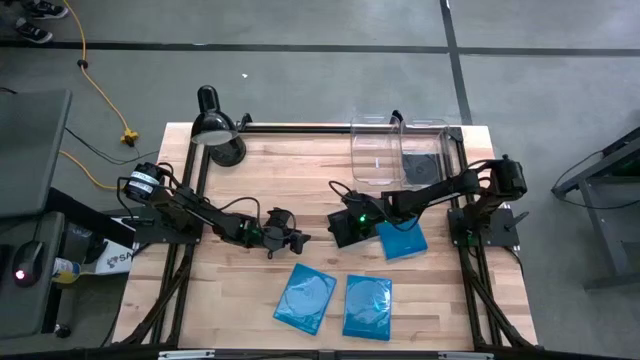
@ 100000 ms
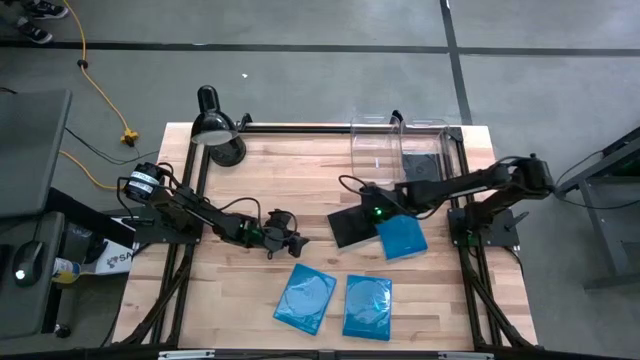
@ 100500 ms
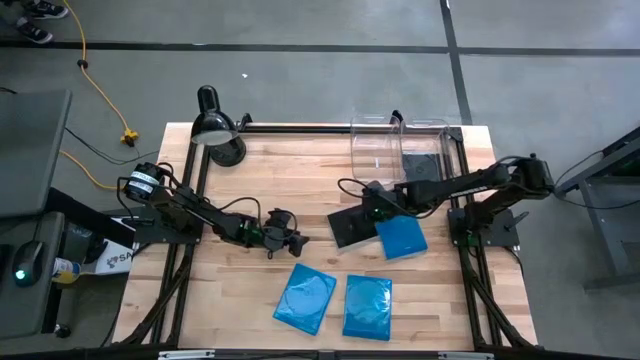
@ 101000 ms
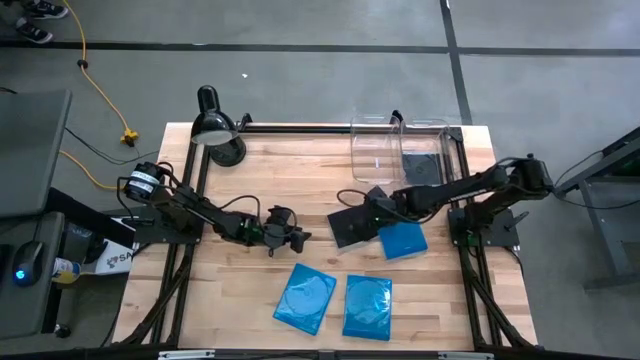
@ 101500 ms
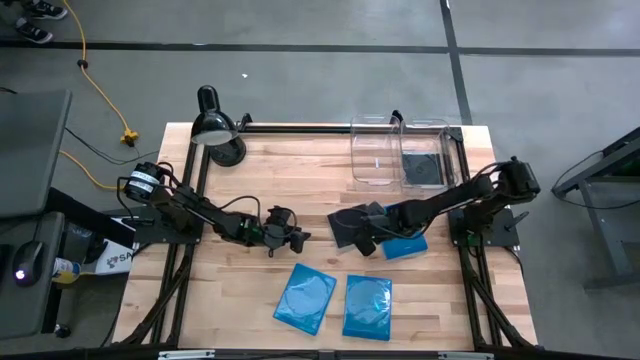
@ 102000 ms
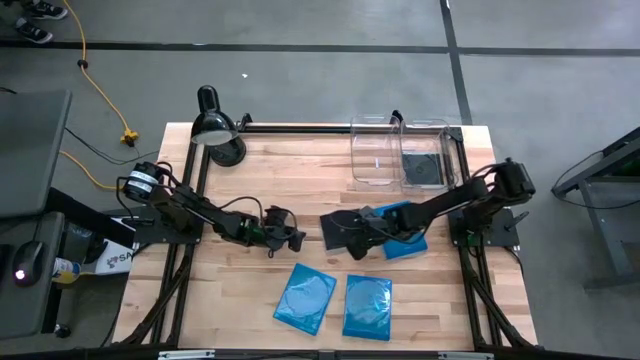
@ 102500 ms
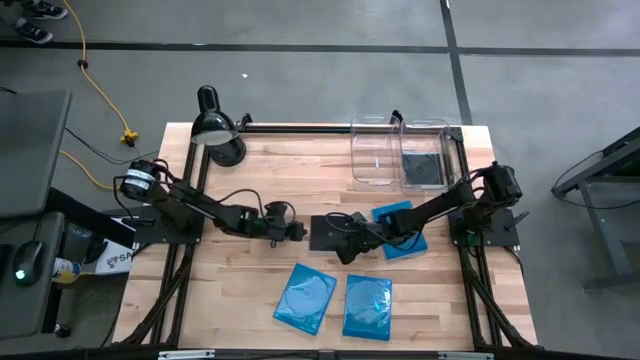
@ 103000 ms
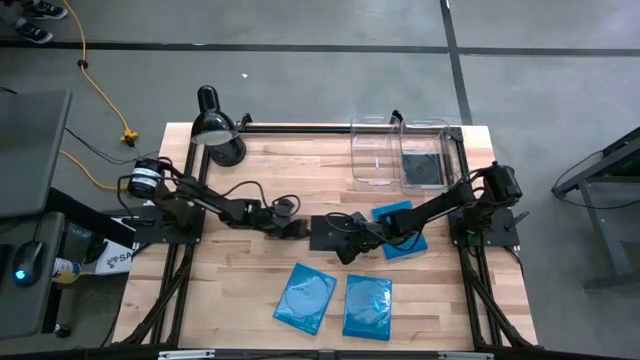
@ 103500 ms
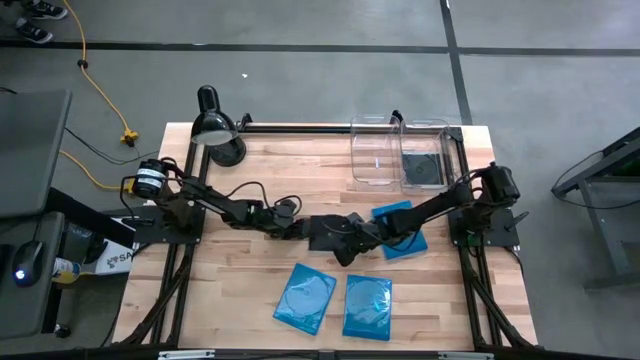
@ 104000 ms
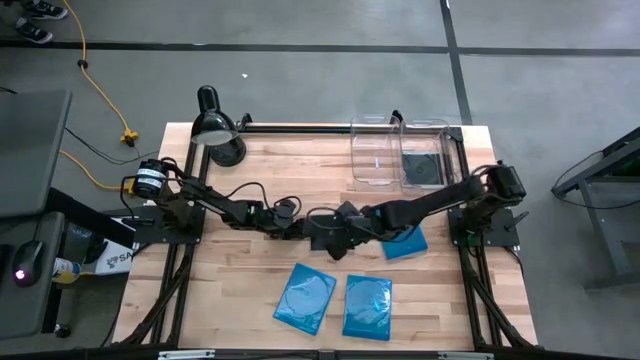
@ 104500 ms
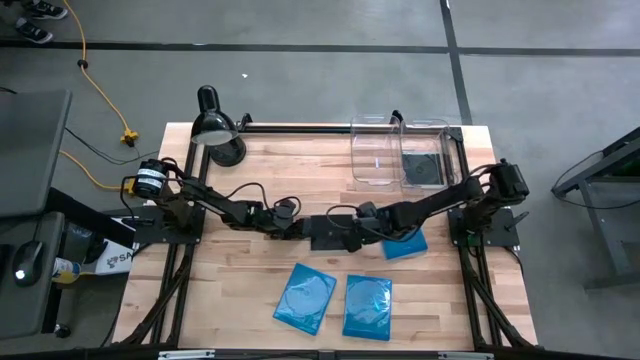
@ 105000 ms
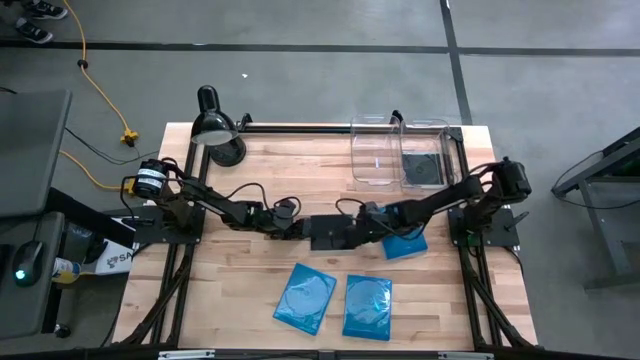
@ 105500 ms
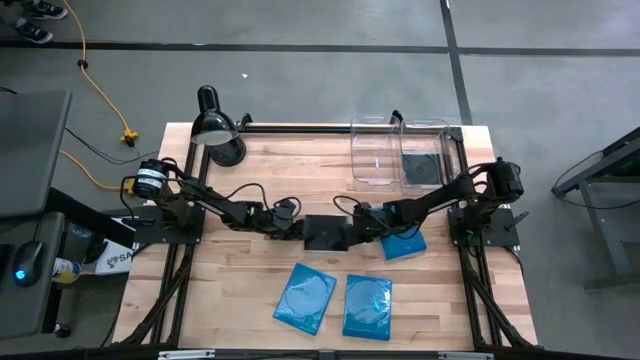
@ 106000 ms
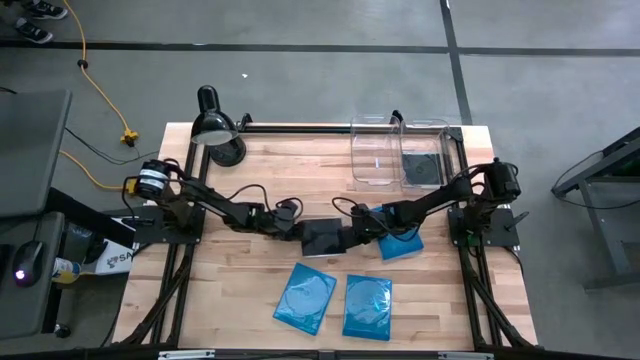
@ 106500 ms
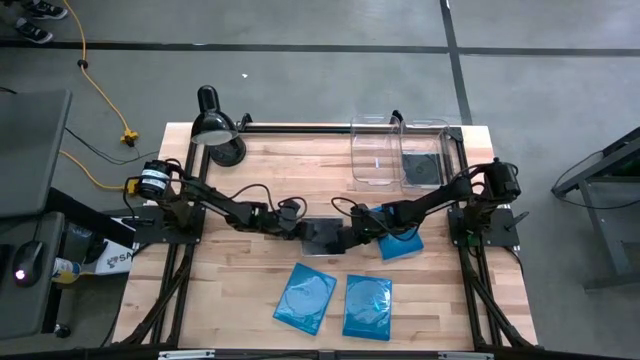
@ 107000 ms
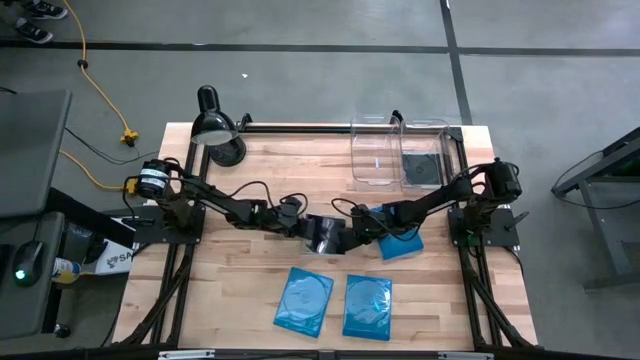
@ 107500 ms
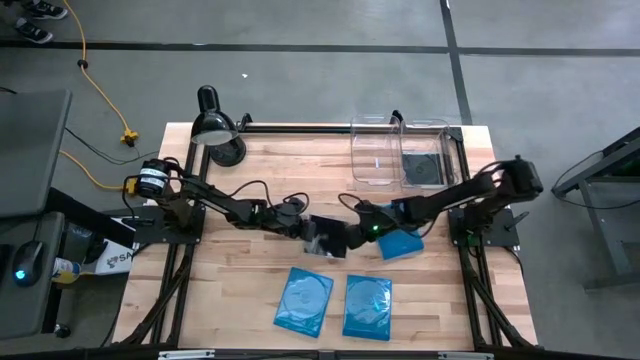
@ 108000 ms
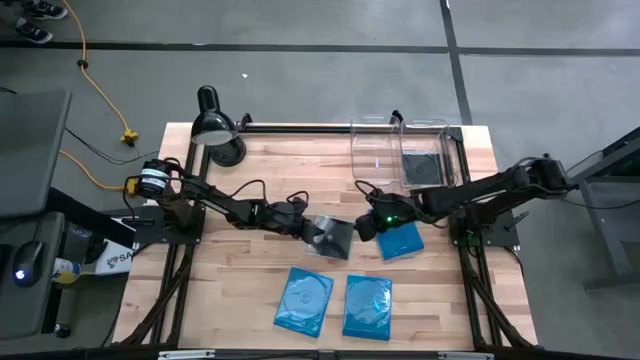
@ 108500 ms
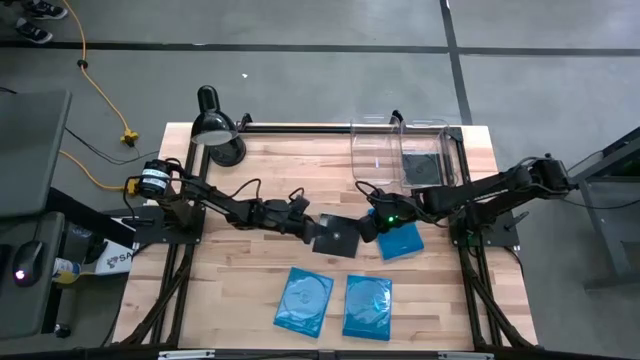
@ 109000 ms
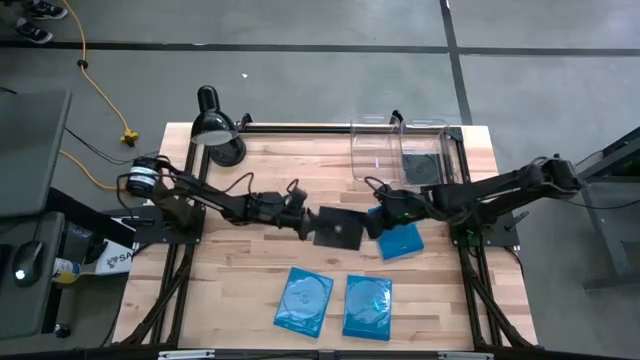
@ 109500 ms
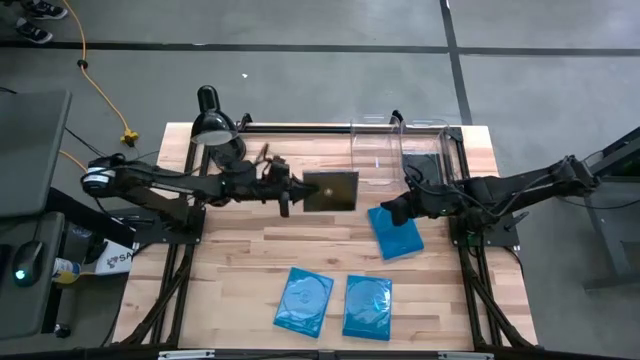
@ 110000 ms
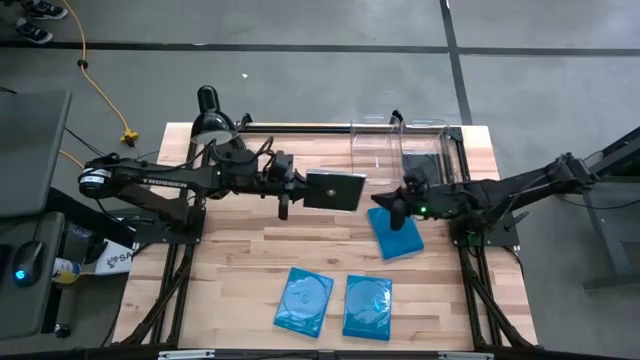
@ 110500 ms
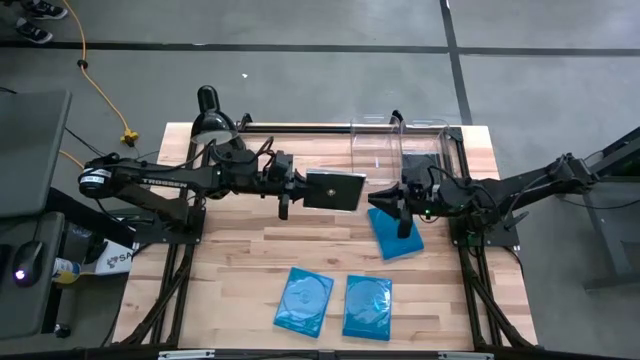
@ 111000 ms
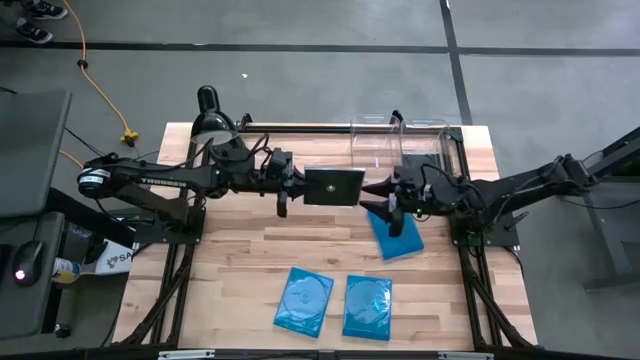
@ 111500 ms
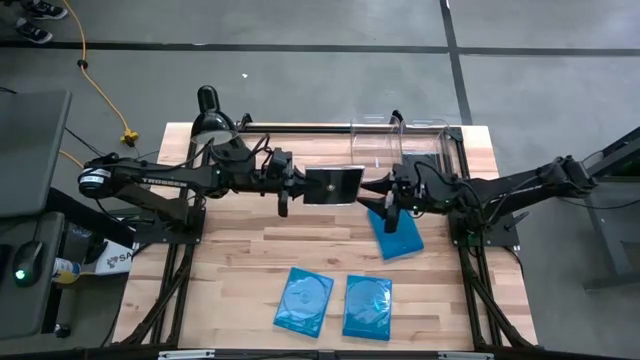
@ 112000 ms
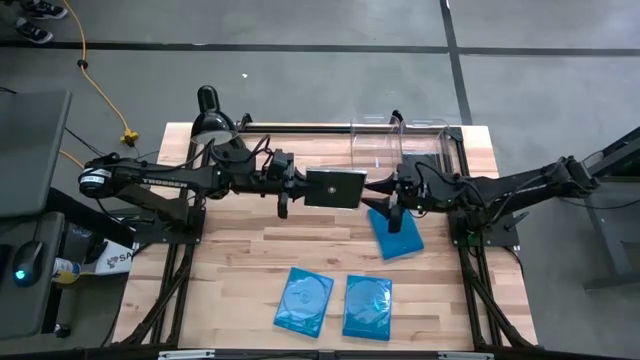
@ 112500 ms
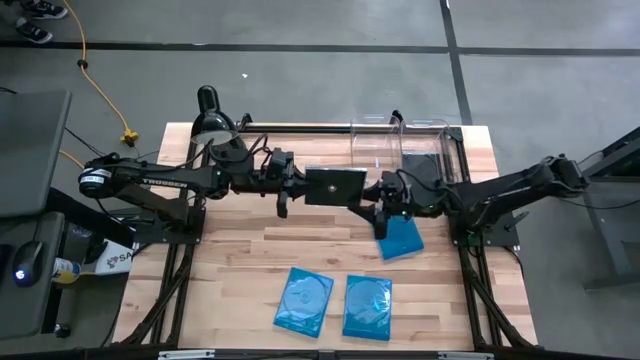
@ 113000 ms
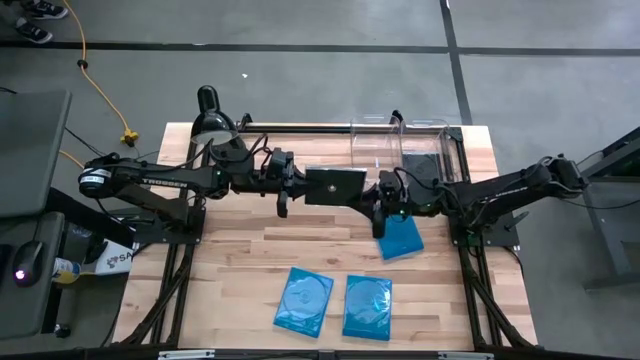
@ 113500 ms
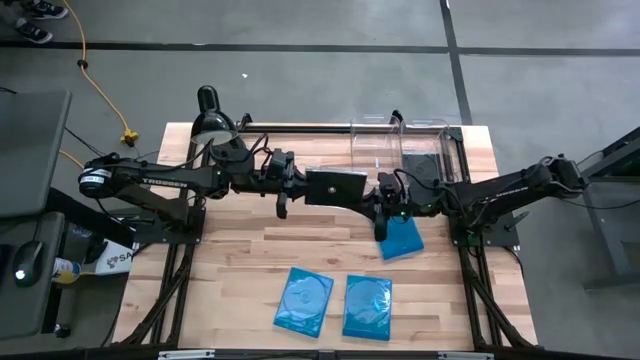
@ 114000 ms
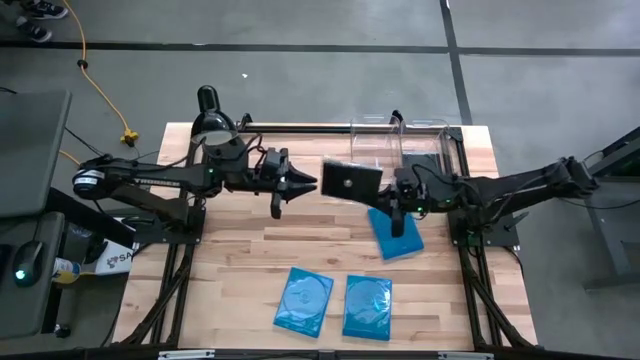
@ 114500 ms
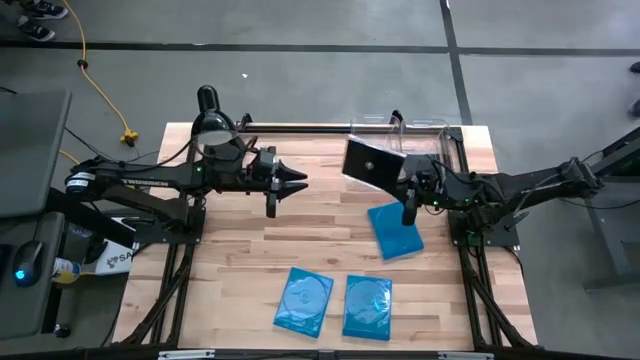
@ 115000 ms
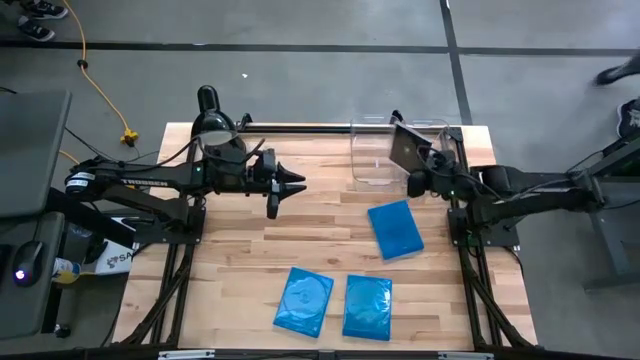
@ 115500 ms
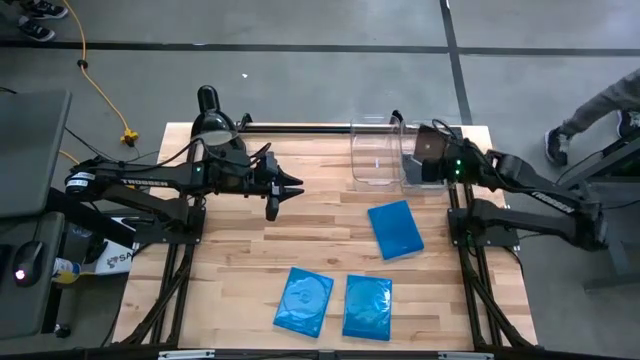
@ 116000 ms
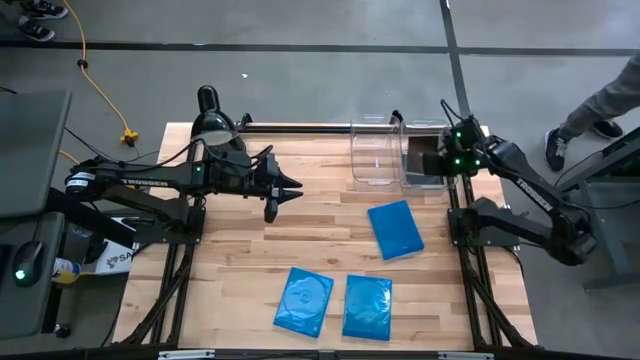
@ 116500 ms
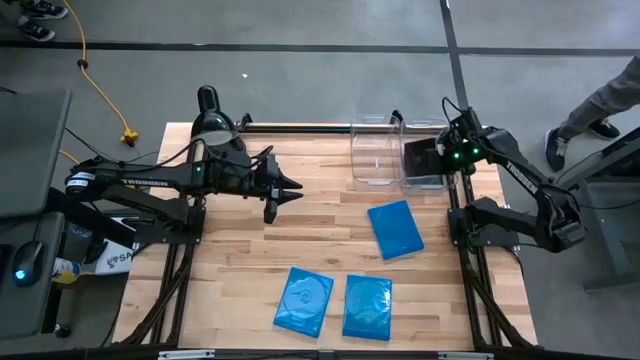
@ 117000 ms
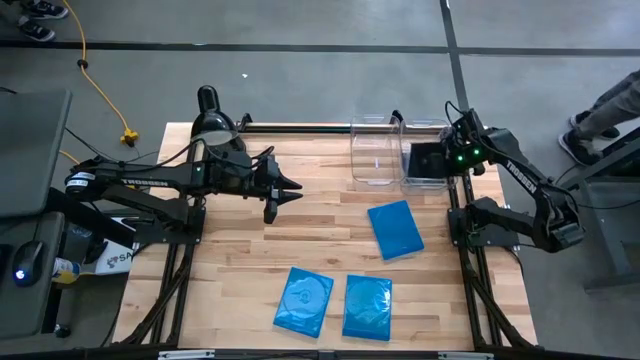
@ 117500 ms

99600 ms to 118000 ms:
Task: Pick & place jewel cases by type
Put the black CD case into the right transparent bin
